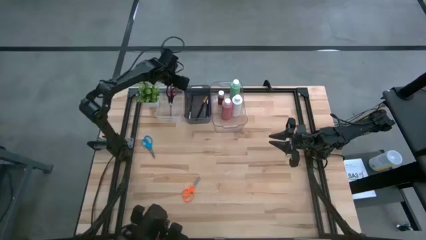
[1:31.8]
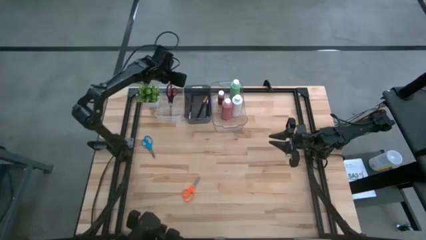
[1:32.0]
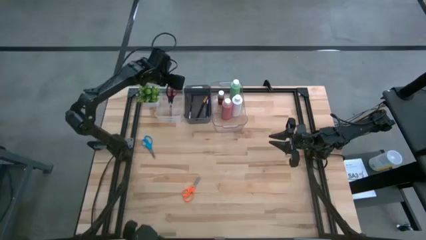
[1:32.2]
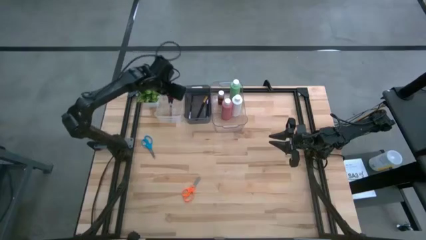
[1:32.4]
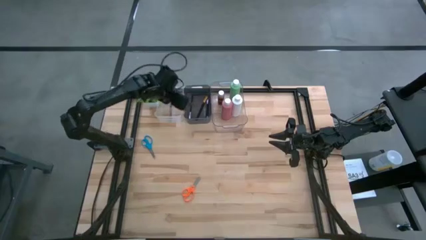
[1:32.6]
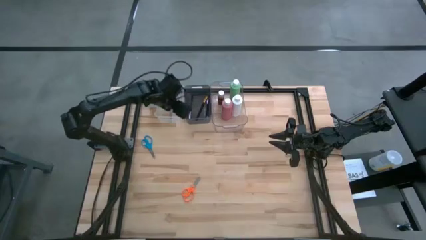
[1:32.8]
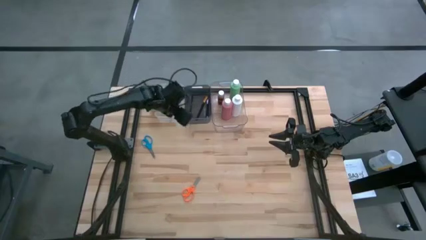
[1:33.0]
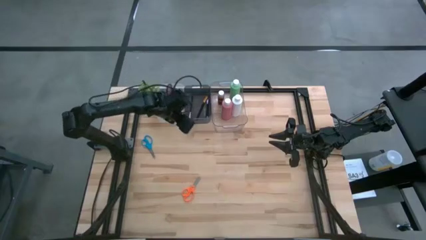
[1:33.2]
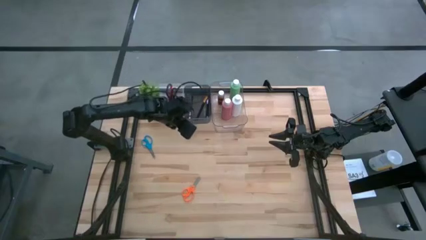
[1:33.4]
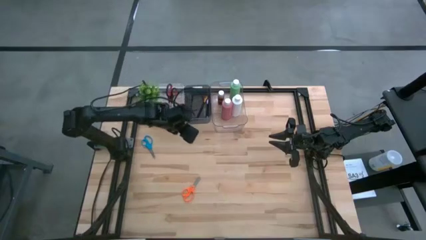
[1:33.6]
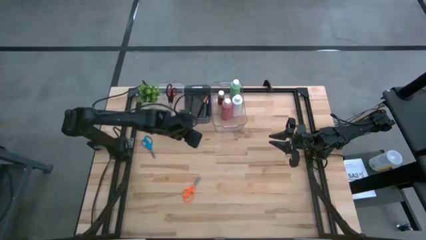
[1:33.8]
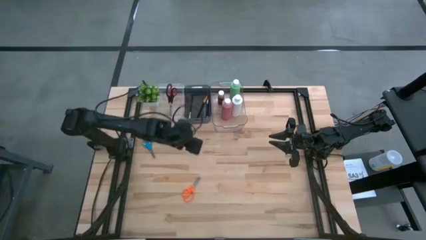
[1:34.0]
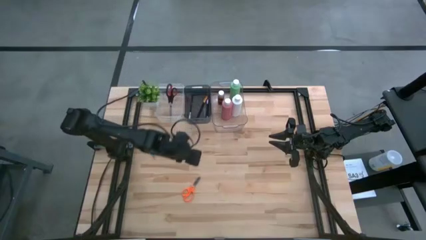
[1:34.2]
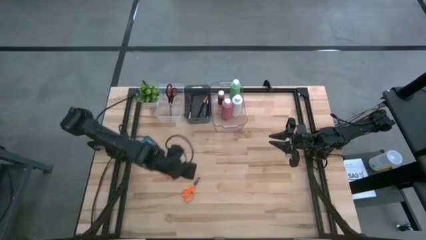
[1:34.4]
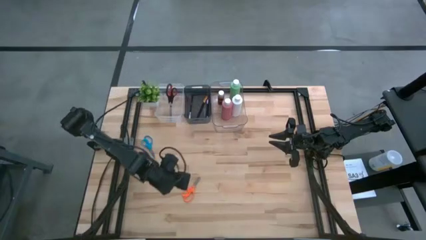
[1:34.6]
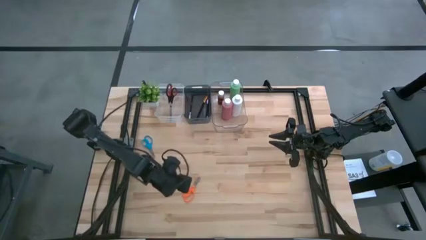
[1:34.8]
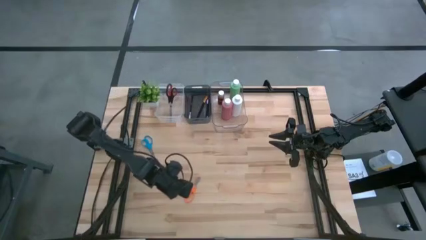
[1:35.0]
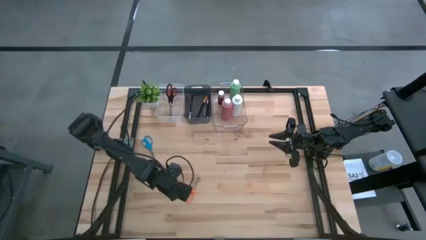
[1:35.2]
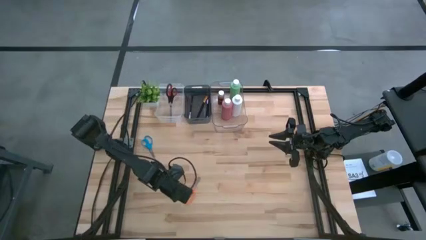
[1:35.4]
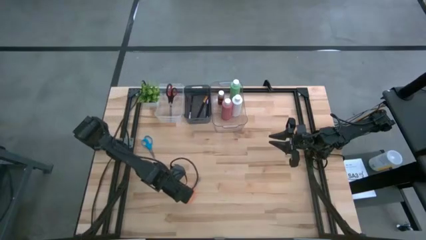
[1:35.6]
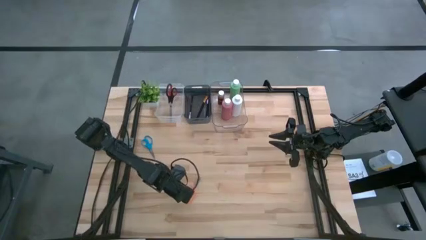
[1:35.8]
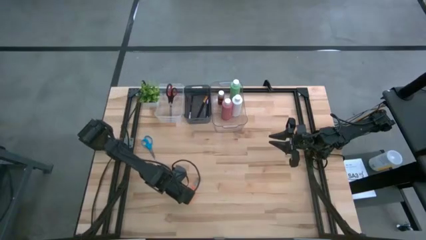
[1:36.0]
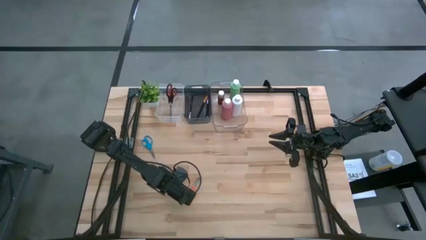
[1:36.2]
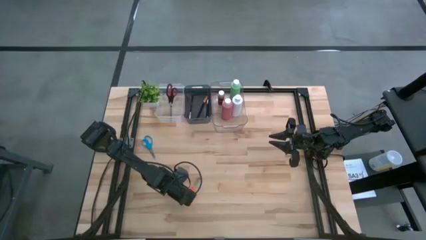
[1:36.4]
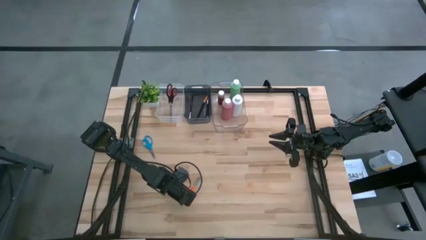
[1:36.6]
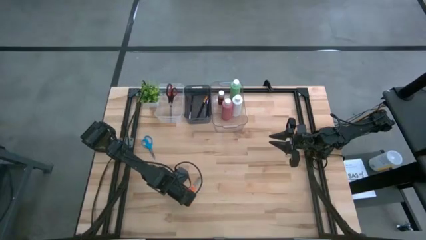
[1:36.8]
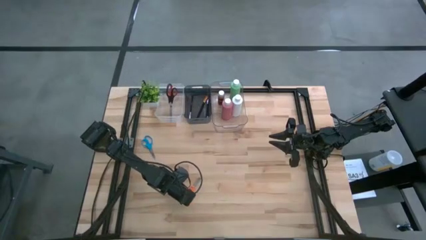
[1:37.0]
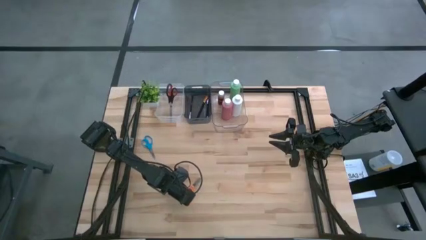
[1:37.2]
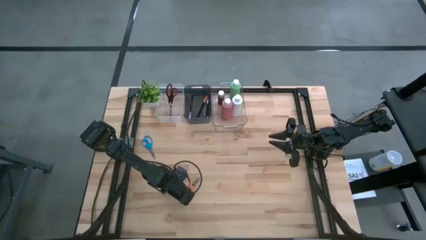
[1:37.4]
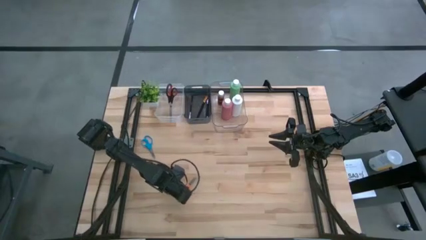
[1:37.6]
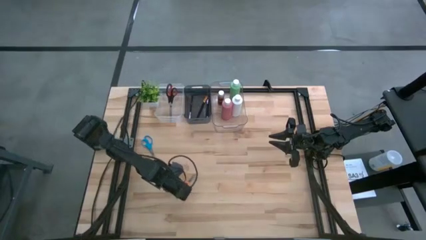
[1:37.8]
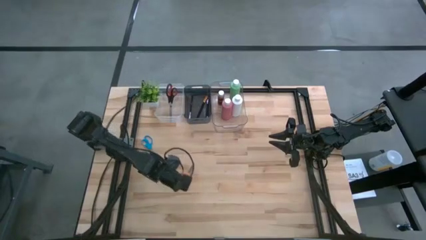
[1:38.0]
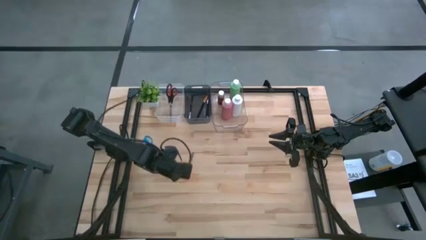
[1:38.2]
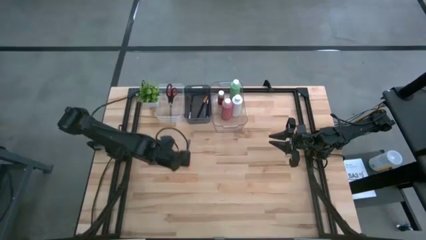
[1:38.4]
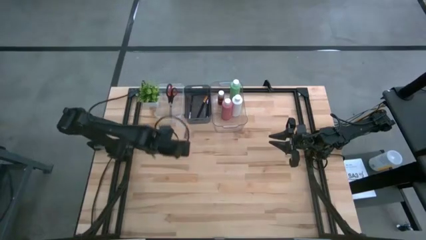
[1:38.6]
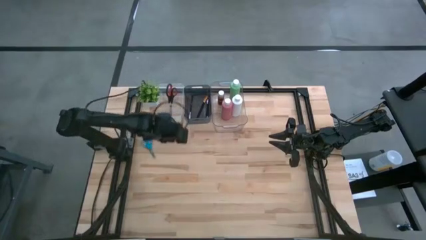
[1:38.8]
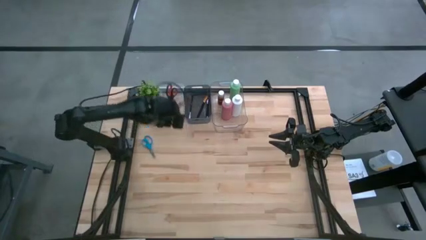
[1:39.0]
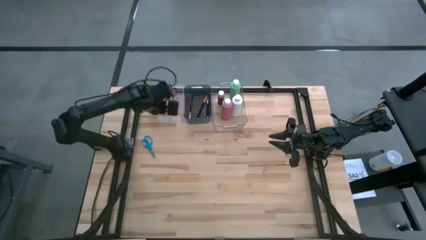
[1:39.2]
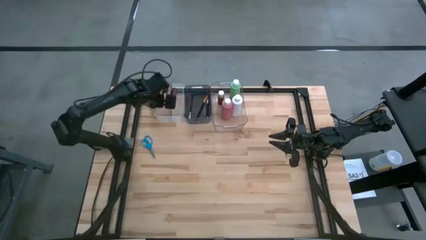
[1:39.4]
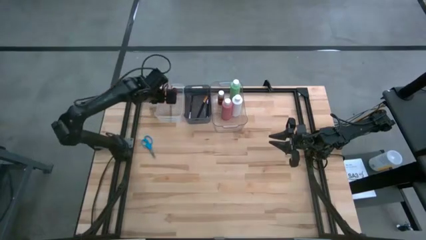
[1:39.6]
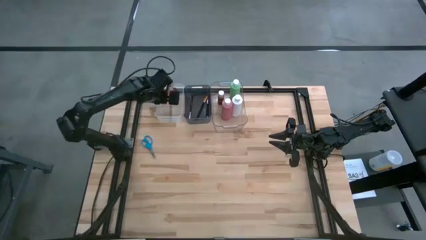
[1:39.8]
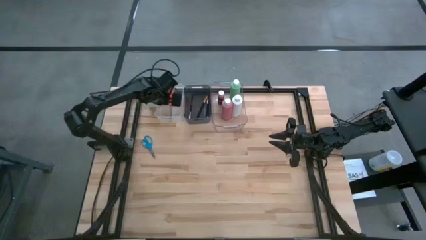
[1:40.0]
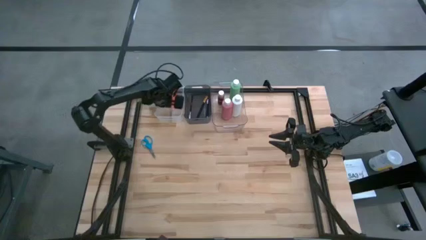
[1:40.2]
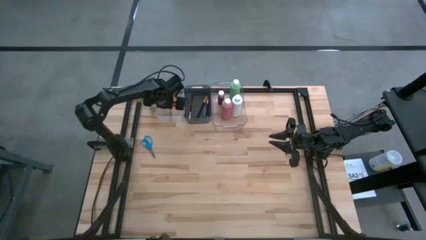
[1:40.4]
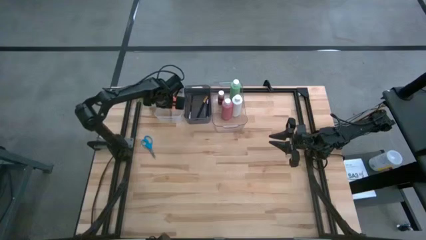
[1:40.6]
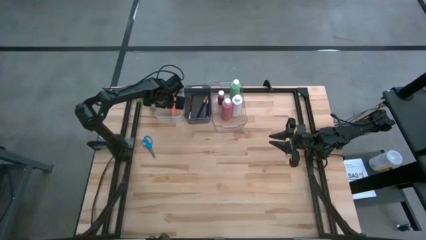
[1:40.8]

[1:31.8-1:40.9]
Task: Pick & Place Paint Supplies
Put the orange scissors into the left transparent bin

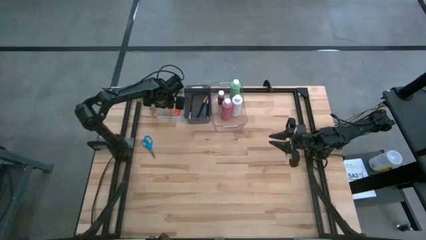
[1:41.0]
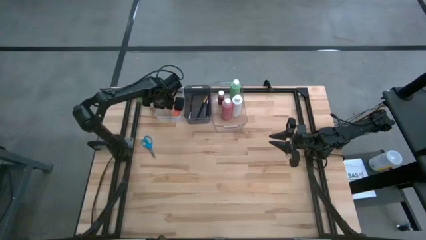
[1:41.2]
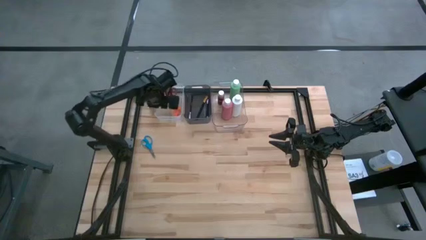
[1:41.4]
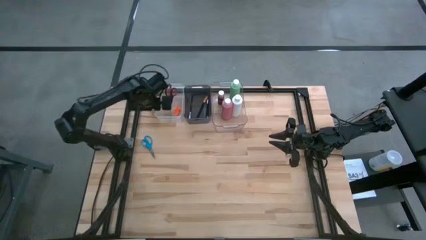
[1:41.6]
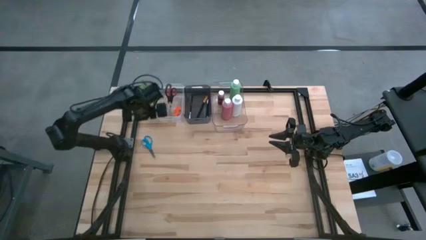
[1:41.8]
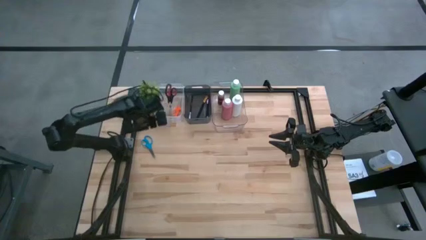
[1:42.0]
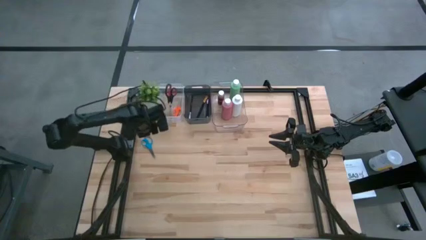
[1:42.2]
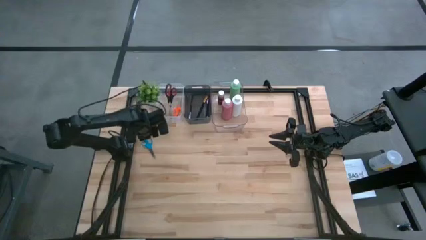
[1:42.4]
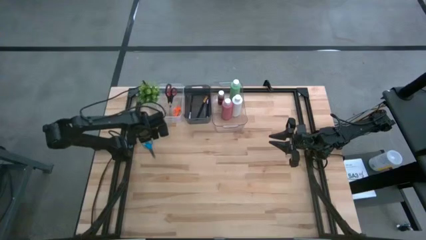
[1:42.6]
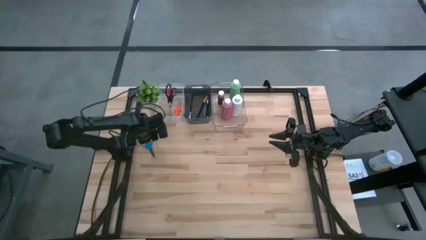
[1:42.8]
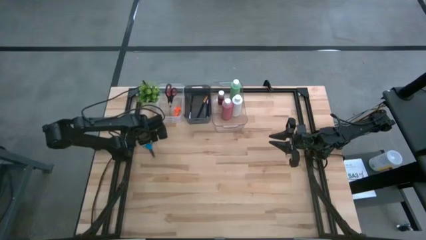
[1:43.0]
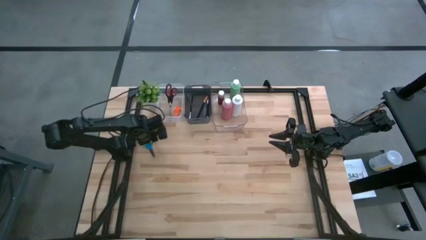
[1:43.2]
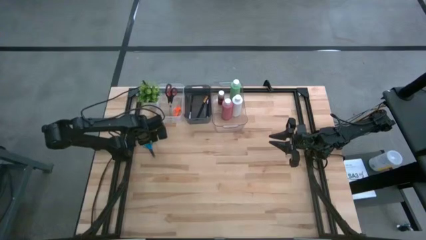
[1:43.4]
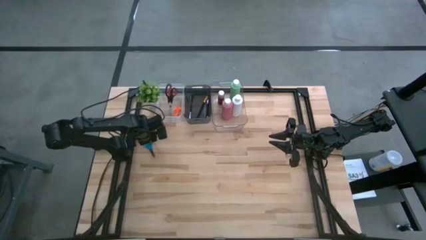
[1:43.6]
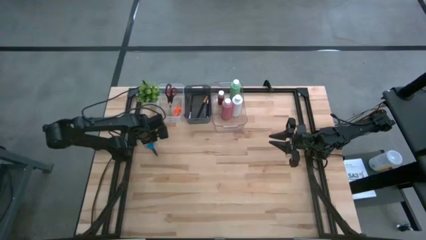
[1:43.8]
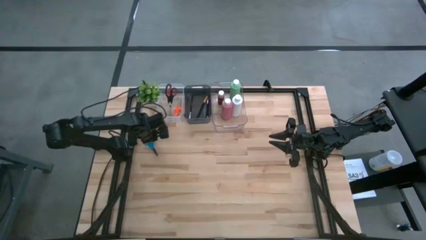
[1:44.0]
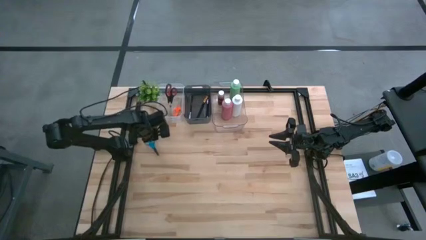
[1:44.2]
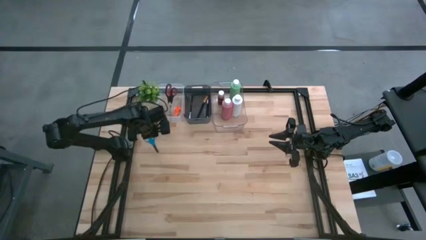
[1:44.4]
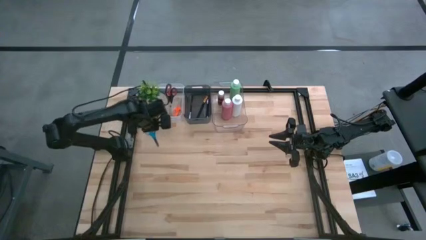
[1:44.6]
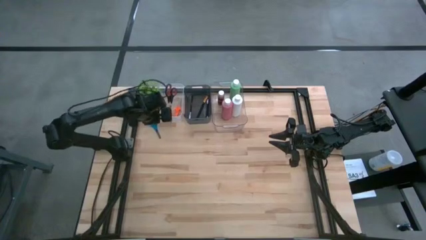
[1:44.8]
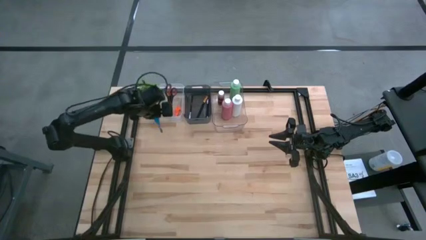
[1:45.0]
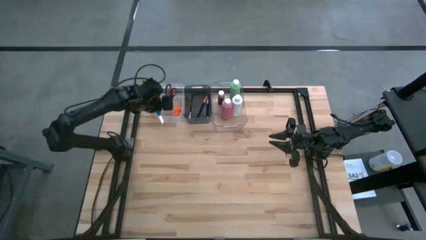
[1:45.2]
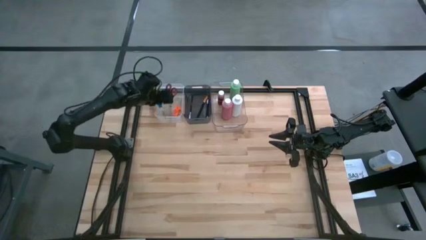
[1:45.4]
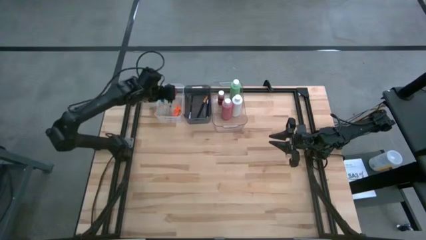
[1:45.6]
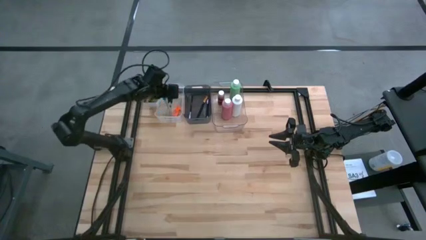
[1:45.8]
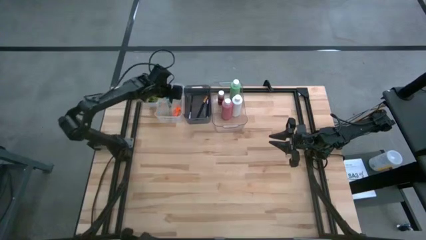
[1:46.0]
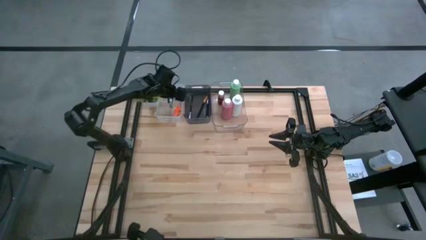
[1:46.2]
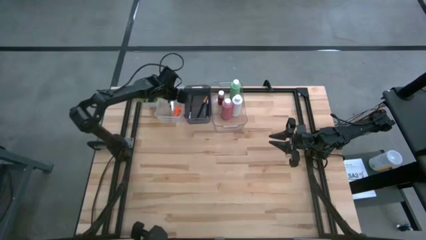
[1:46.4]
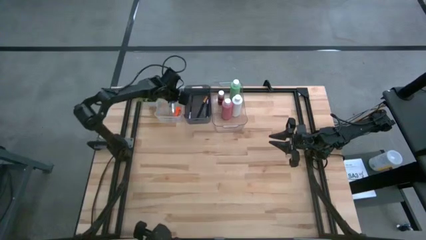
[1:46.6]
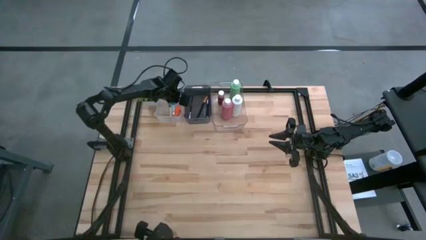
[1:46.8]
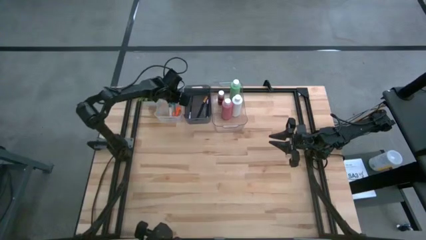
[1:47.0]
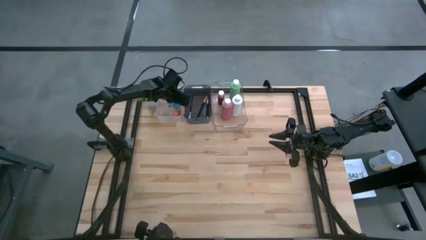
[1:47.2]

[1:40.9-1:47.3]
Put the blue scissors into the left transparent bin

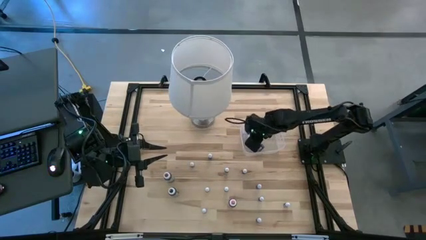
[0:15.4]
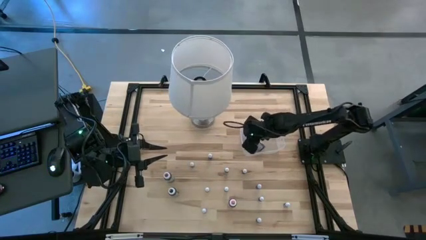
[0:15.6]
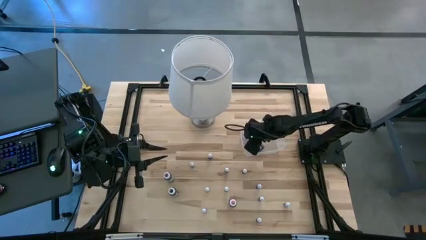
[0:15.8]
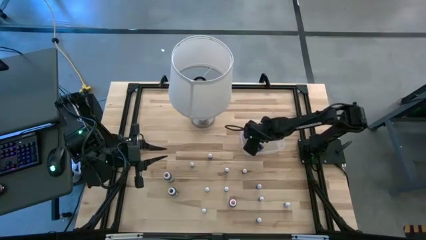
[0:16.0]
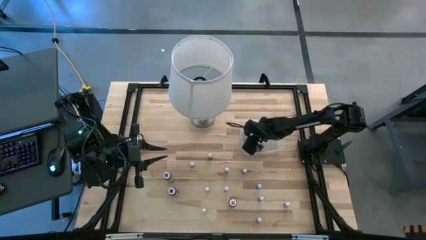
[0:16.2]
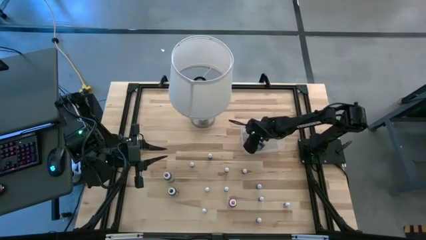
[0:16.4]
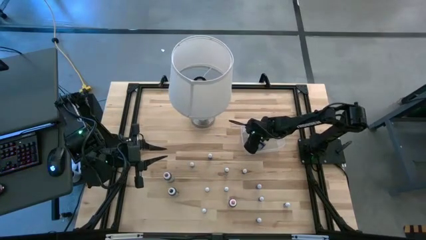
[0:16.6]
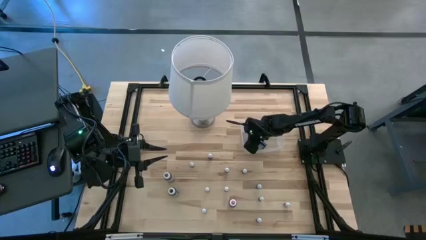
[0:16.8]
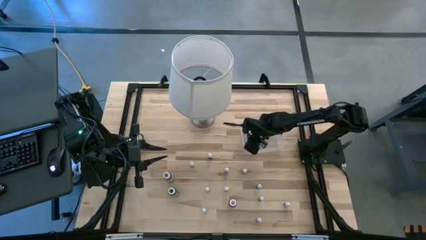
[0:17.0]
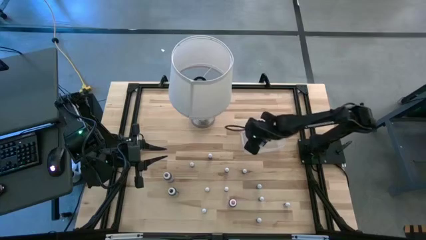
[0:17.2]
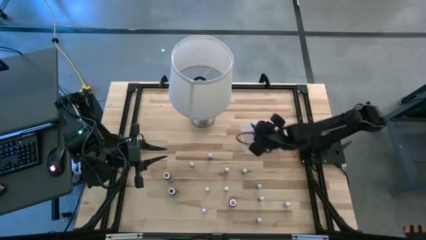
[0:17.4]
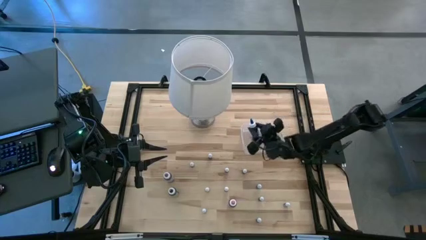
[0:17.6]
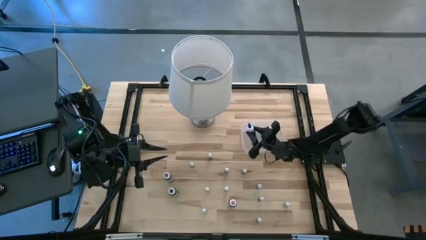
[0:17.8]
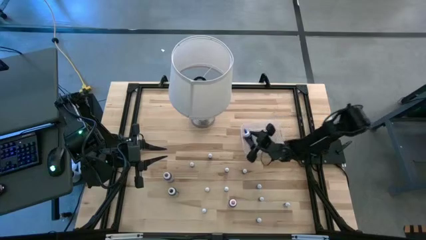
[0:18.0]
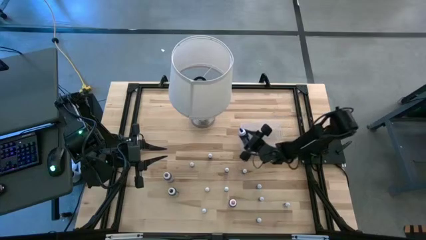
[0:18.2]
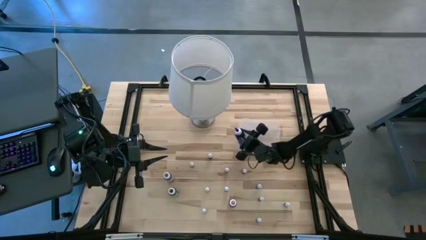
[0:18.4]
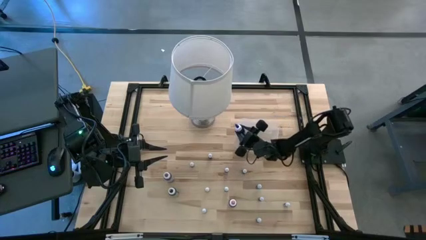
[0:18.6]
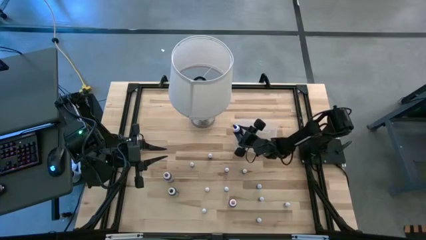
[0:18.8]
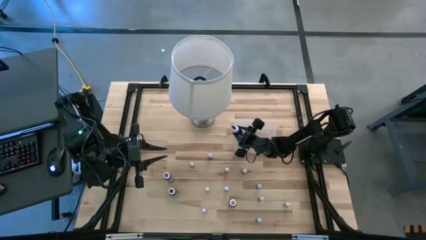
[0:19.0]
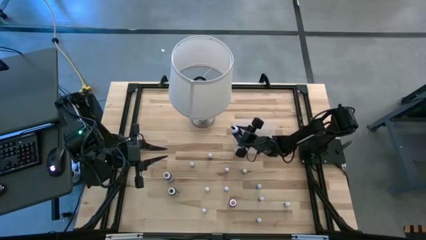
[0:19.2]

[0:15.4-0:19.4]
Task: Pick & Place food coloring
Put the large blue food coloring bottle into the transparent bin
